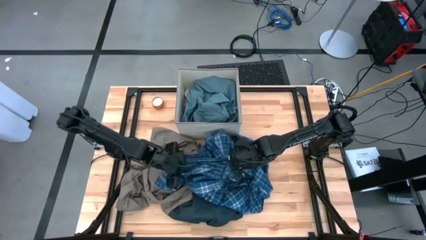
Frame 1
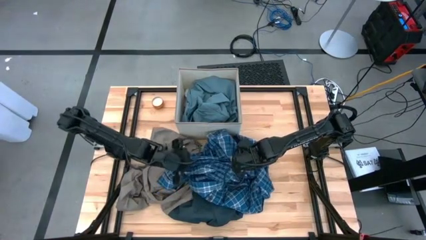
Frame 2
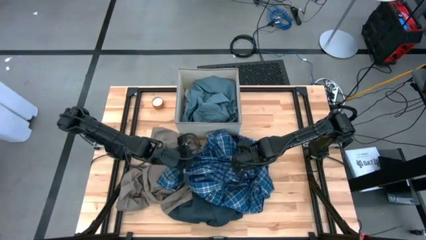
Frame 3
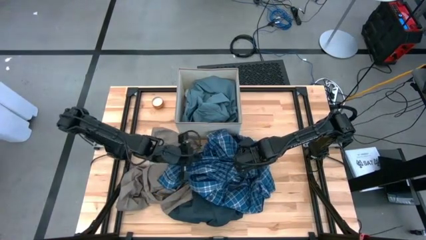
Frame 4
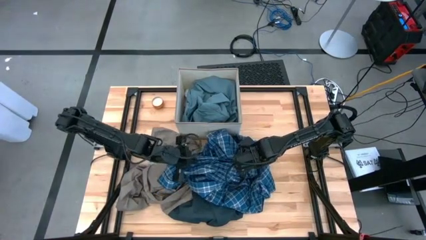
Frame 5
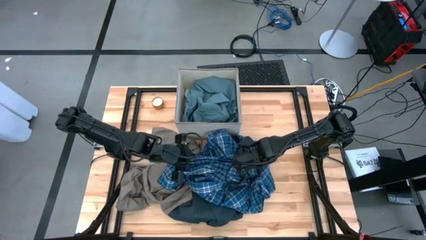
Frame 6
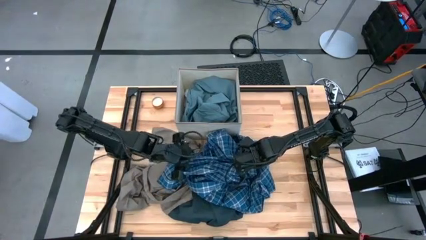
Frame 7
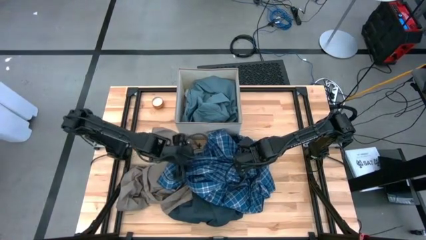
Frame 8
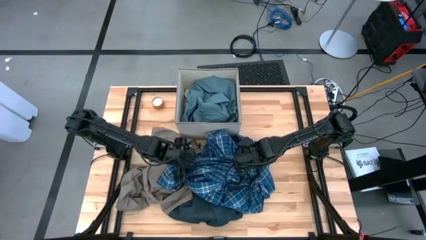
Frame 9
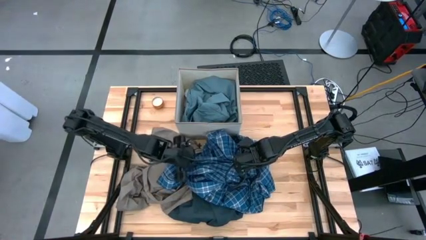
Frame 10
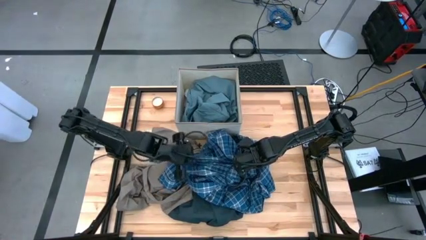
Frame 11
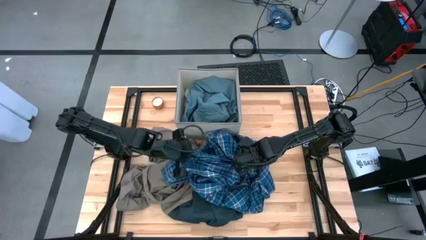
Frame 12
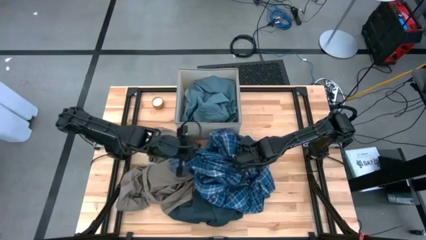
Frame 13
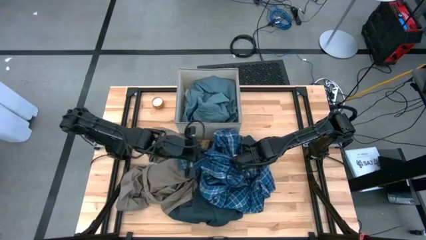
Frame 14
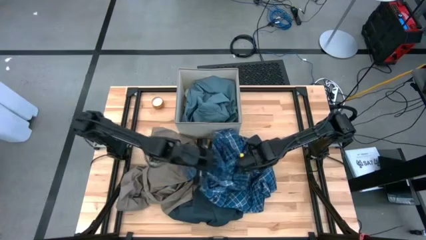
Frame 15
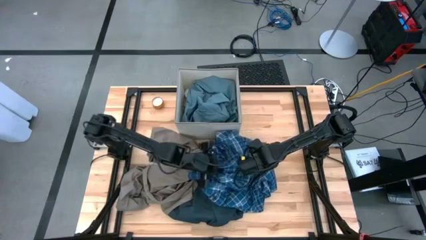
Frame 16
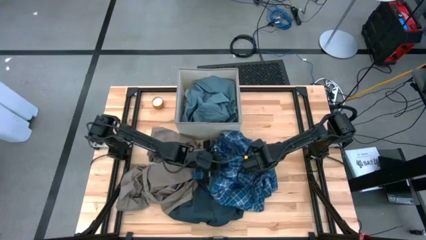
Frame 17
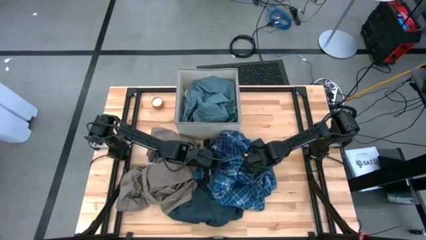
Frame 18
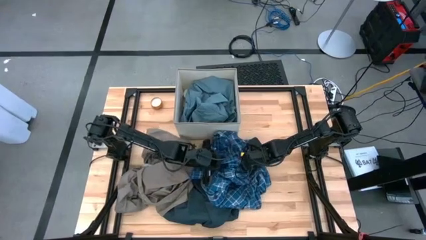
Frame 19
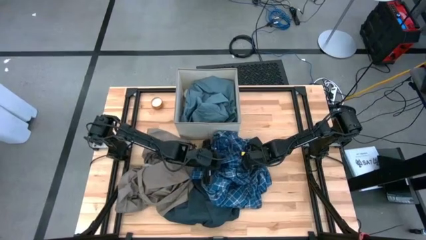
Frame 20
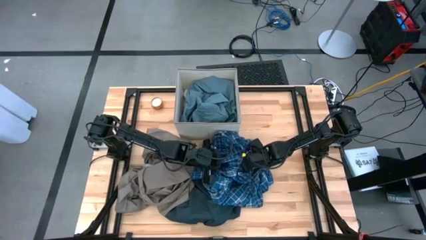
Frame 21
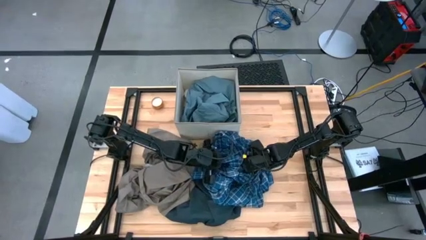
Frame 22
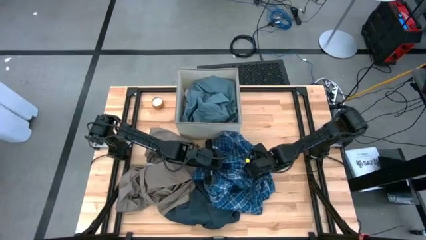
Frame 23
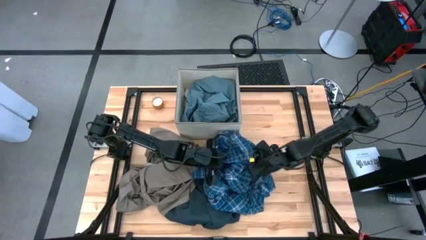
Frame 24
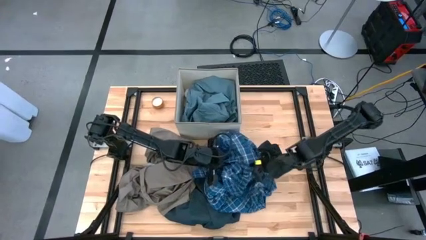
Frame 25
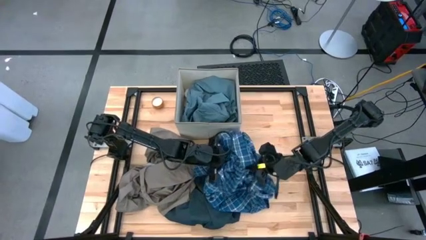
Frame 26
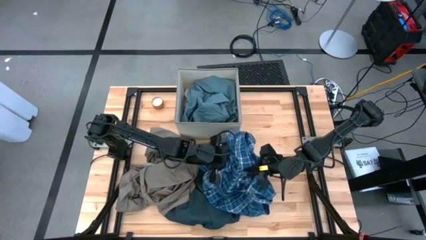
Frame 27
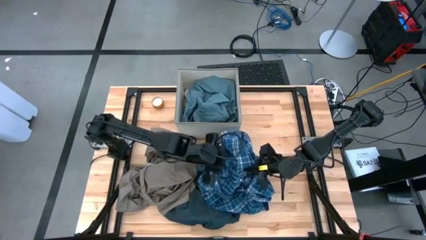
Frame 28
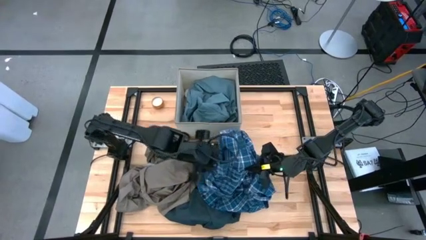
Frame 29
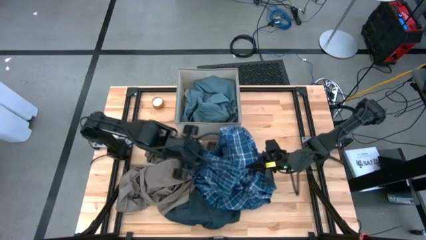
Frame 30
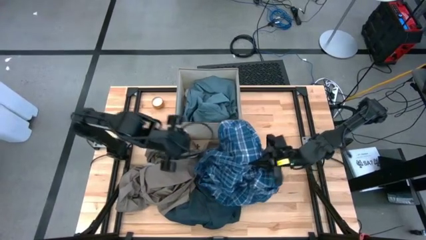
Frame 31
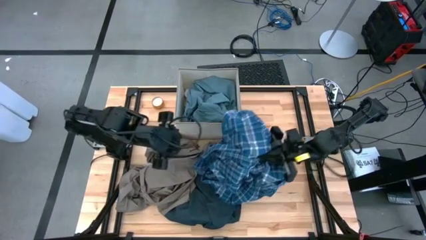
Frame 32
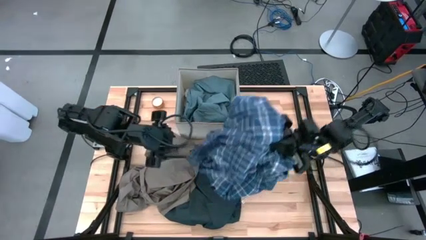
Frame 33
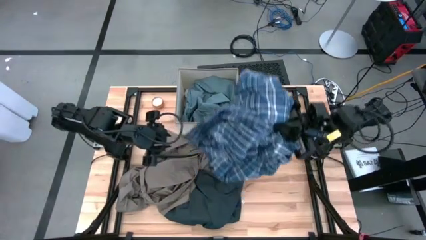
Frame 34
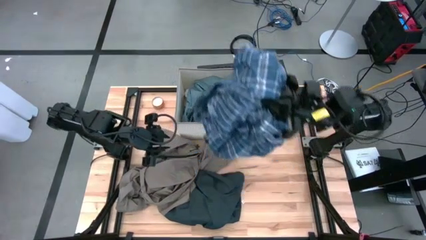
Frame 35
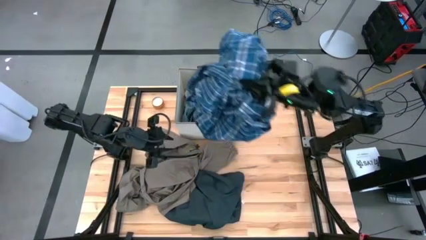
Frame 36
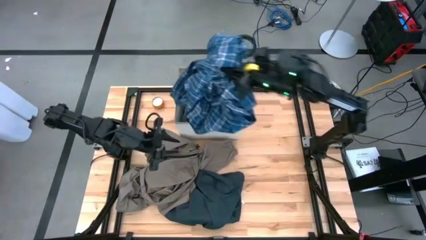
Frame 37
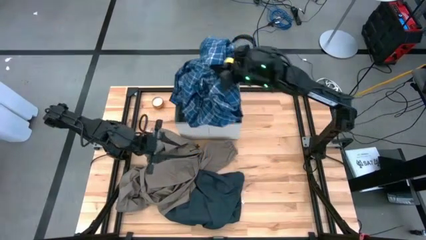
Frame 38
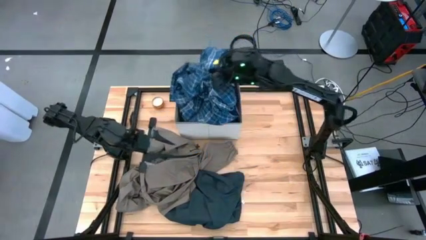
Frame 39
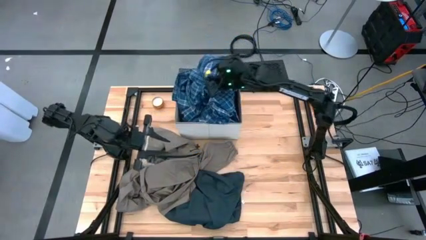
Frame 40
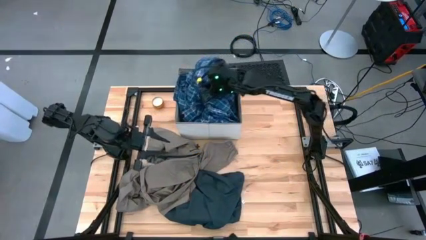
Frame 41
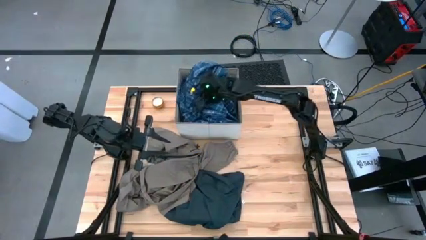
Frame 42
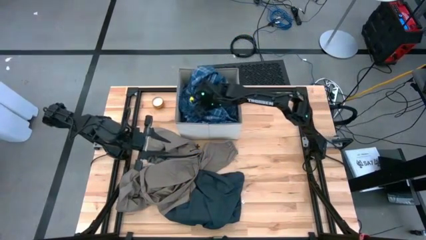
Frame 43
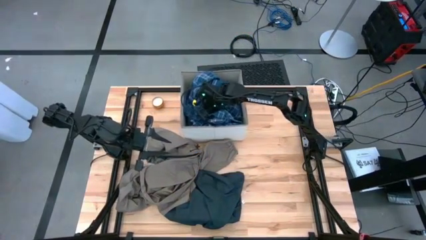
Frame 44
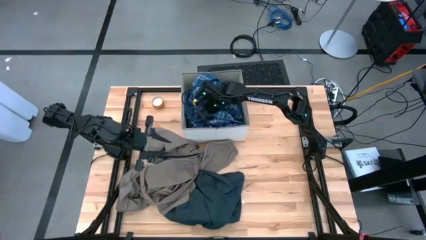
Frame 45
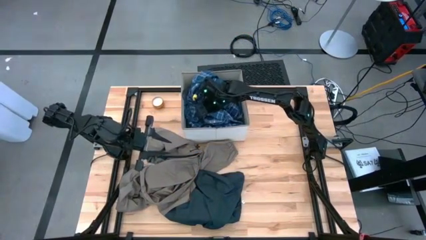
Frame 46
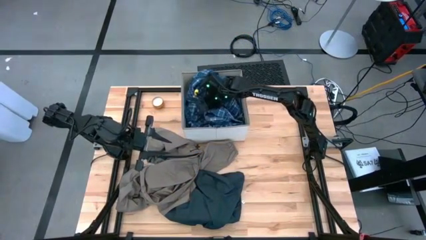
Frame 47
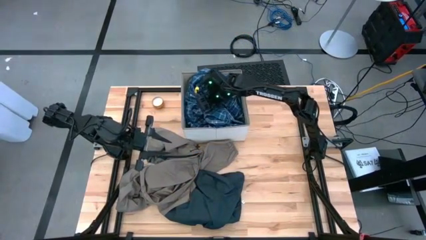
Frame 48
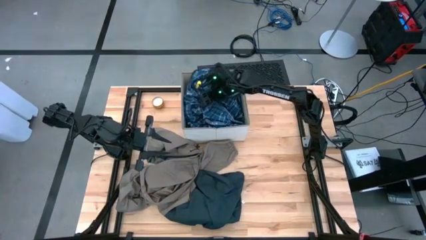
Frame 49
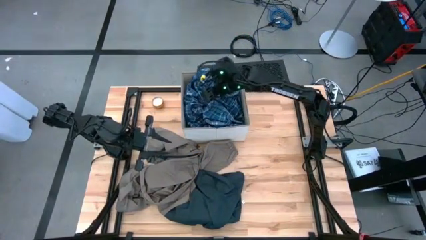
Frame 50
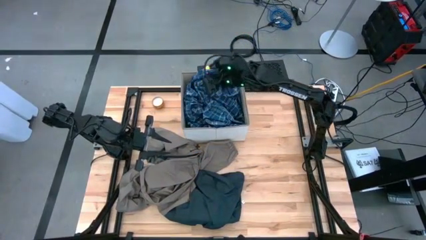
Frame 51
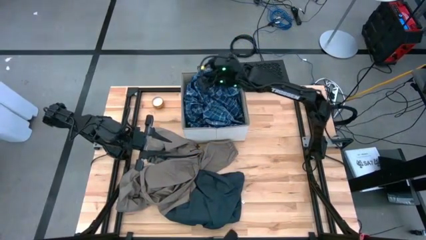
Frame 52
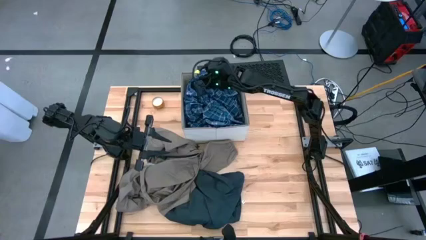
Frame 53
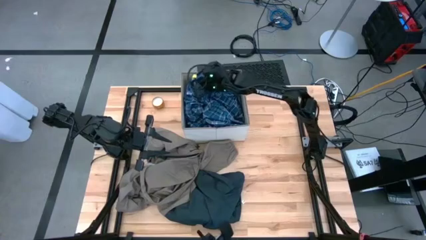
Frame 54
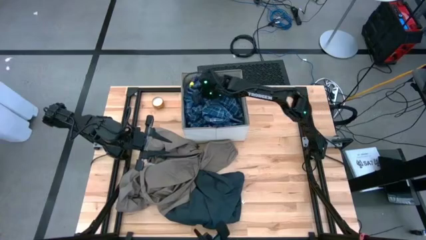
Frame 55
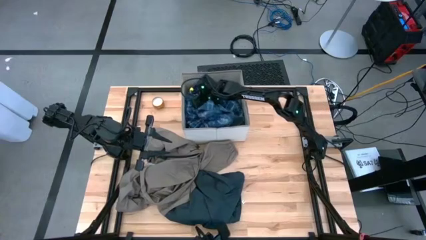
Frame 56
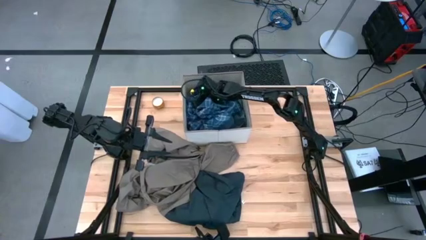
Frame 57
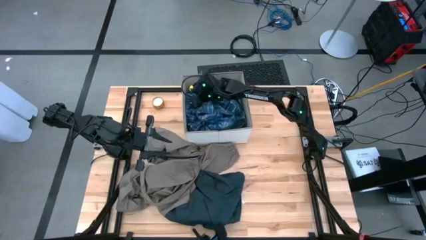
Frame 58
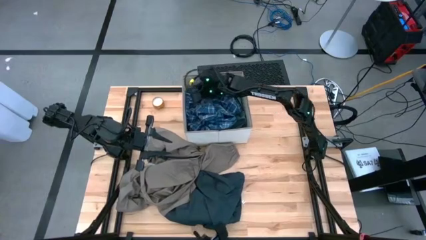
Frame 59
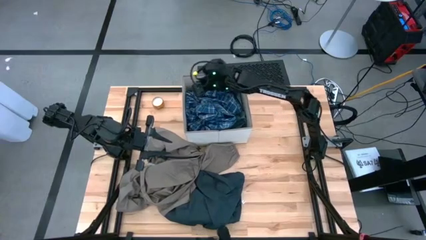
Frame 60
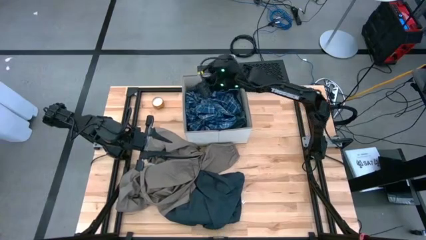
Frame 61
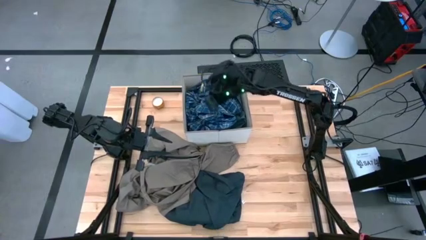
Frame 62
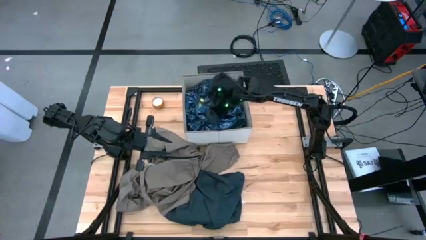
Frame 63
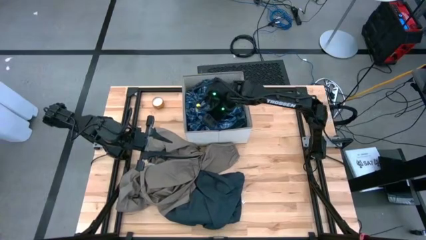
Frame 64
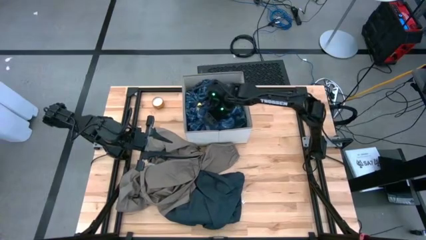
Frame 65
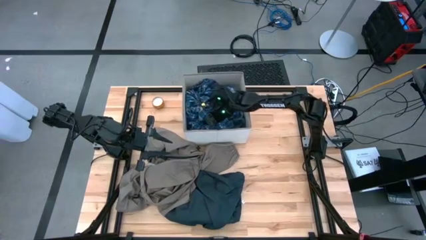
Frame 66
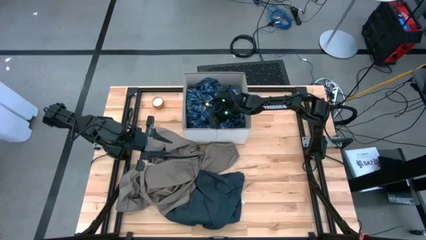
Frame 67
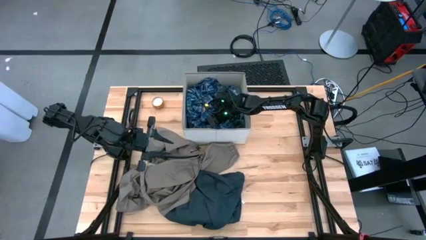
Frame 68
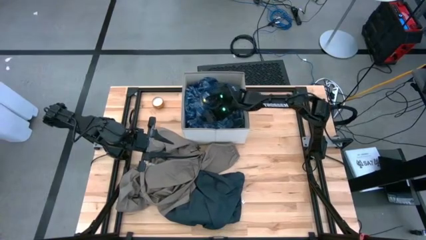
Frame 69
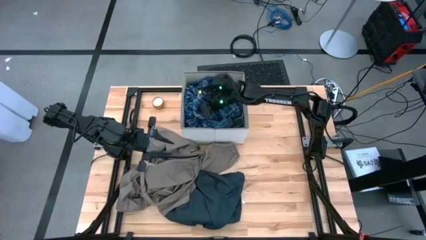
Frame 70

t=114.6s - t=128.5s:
Task: Sort clothes
Put the blue plaid shirt into the laundry bin
